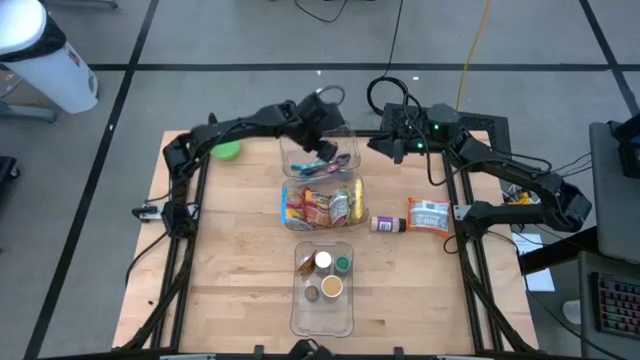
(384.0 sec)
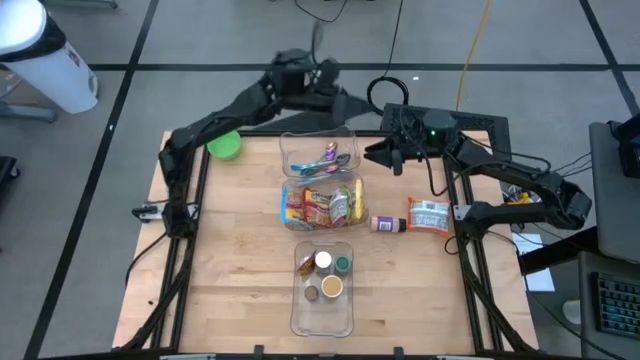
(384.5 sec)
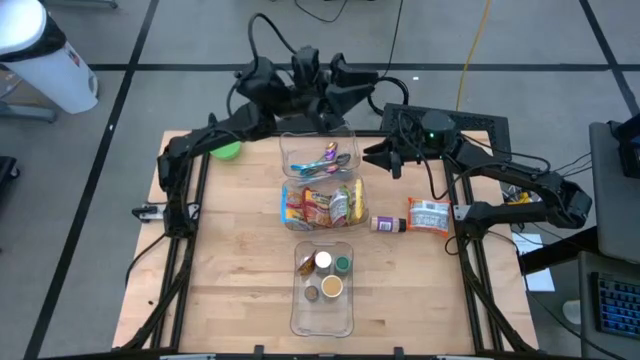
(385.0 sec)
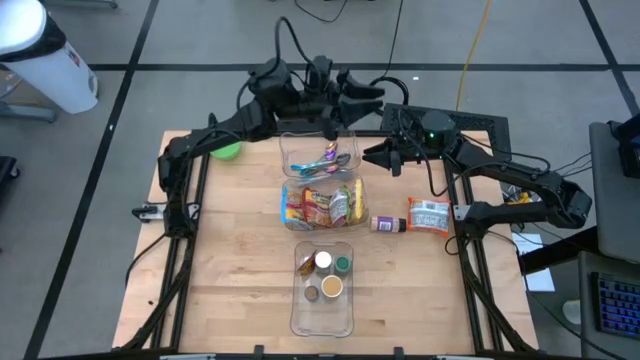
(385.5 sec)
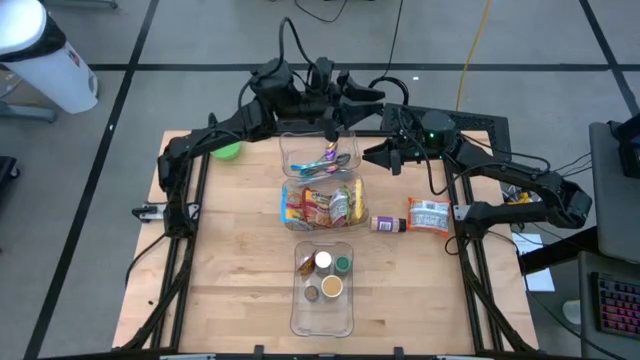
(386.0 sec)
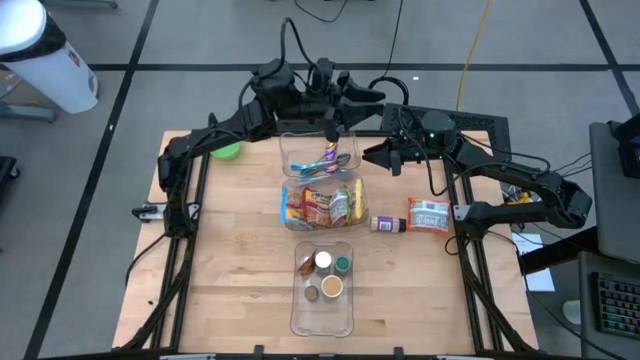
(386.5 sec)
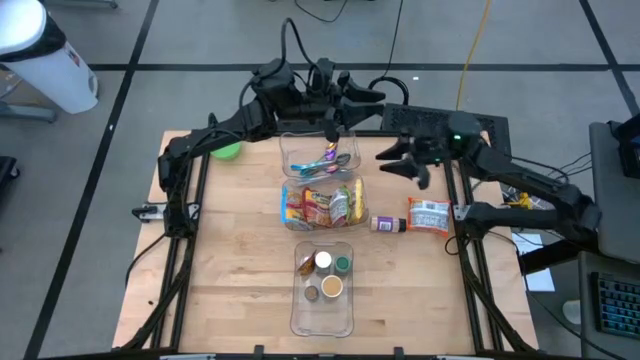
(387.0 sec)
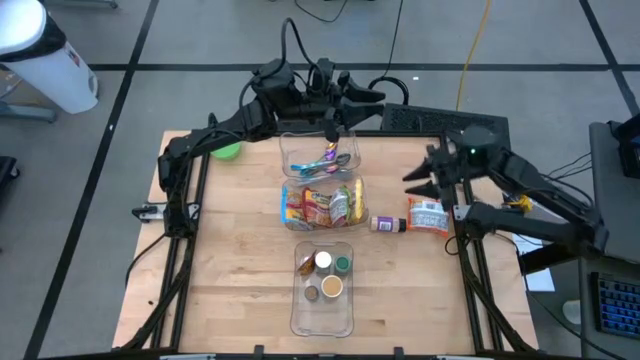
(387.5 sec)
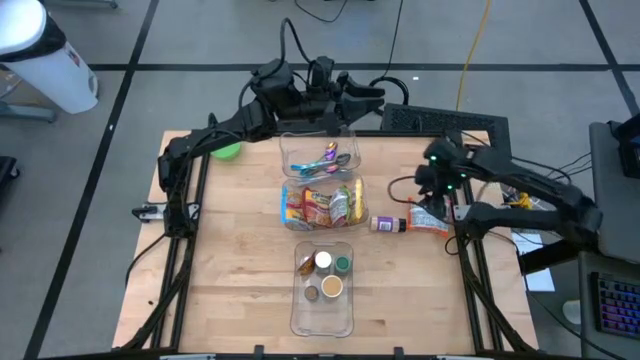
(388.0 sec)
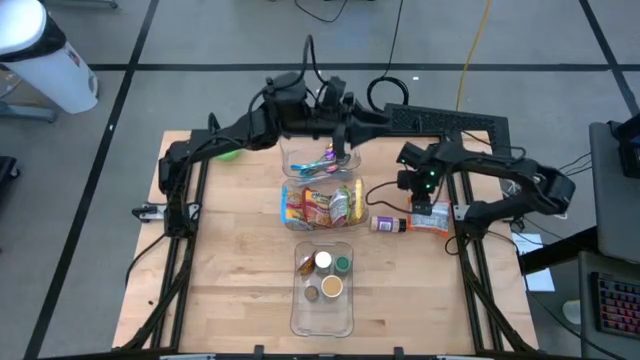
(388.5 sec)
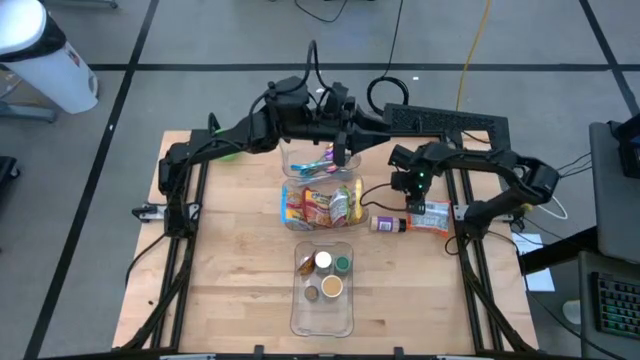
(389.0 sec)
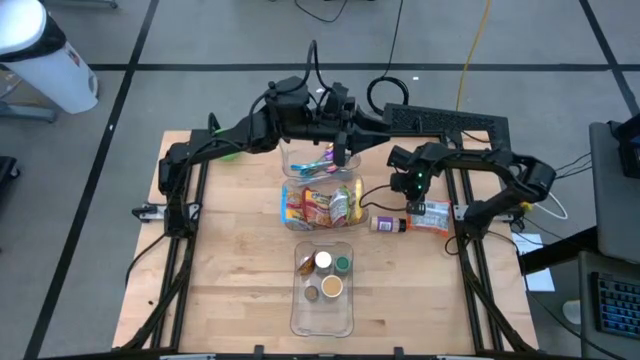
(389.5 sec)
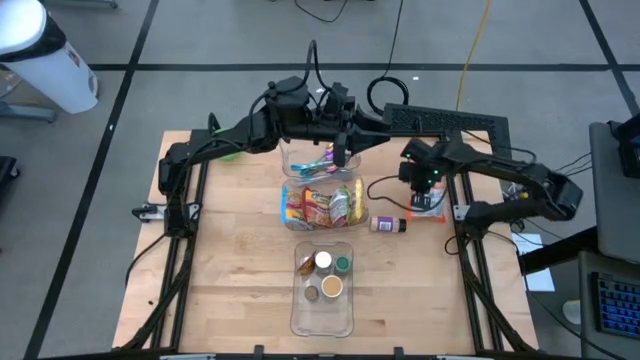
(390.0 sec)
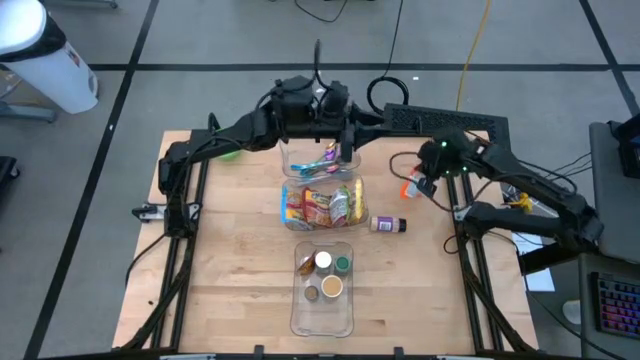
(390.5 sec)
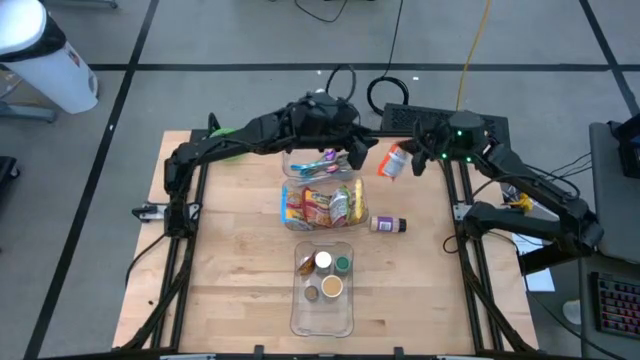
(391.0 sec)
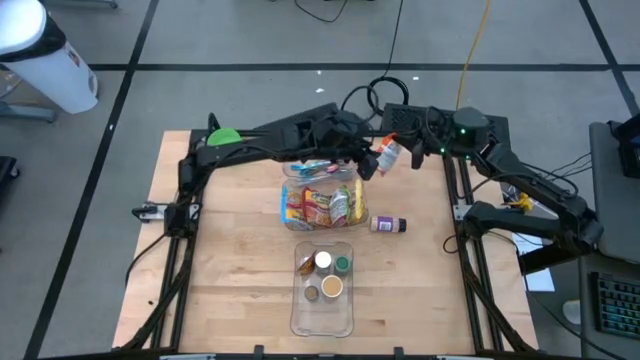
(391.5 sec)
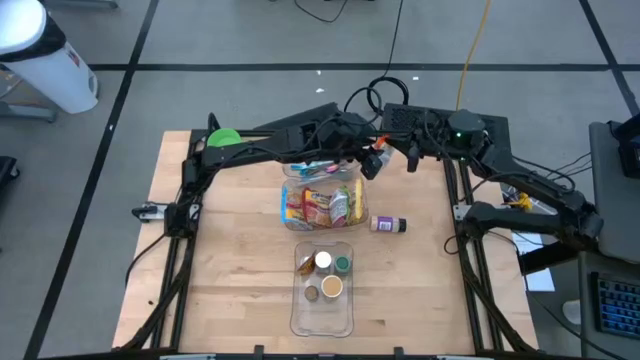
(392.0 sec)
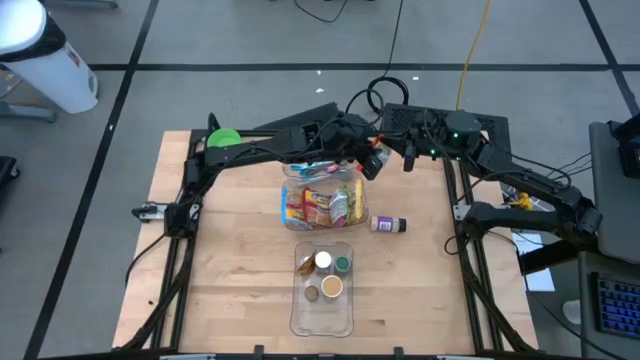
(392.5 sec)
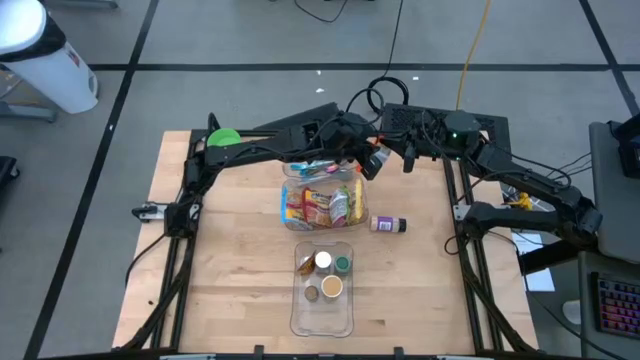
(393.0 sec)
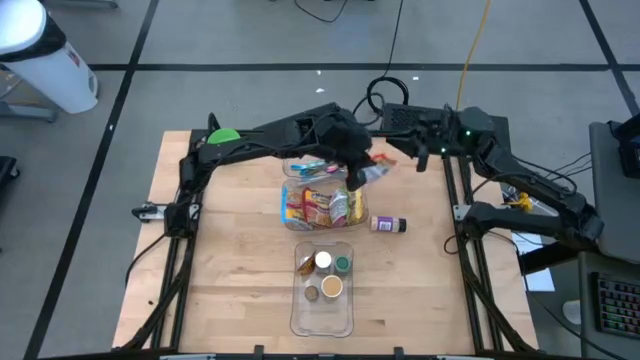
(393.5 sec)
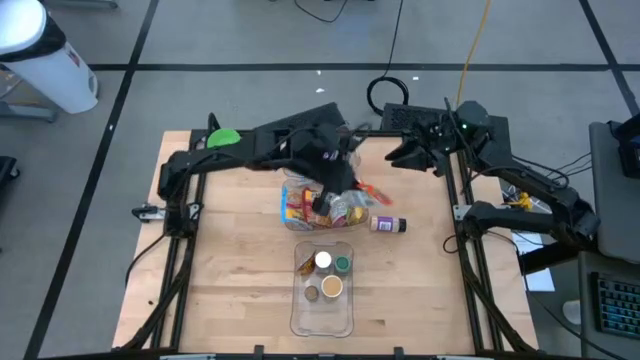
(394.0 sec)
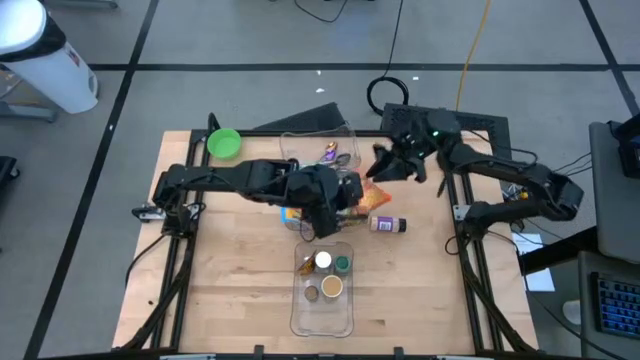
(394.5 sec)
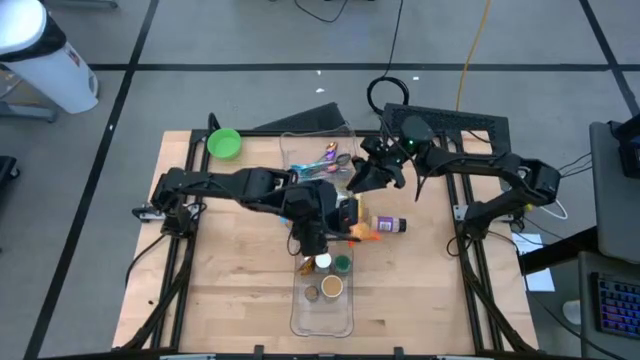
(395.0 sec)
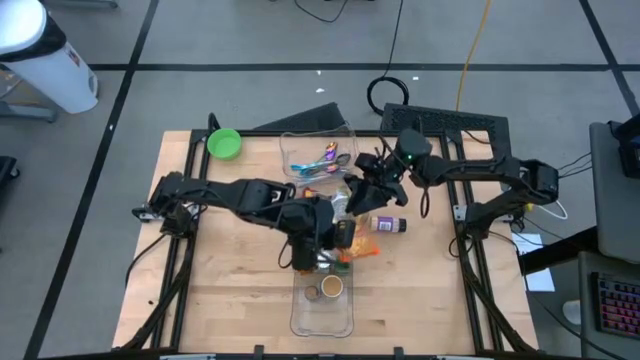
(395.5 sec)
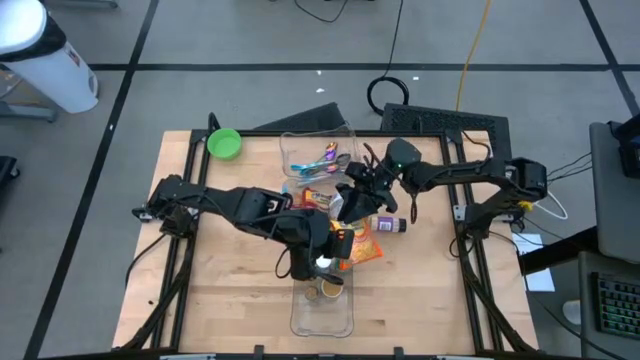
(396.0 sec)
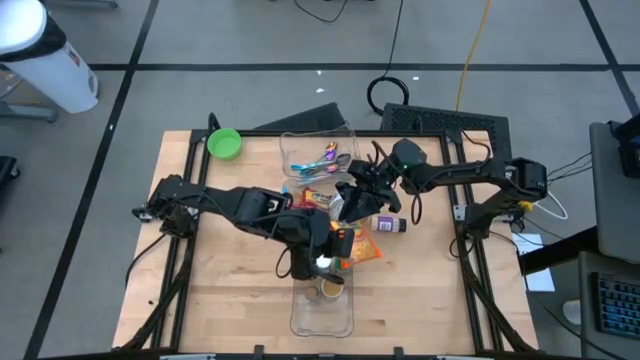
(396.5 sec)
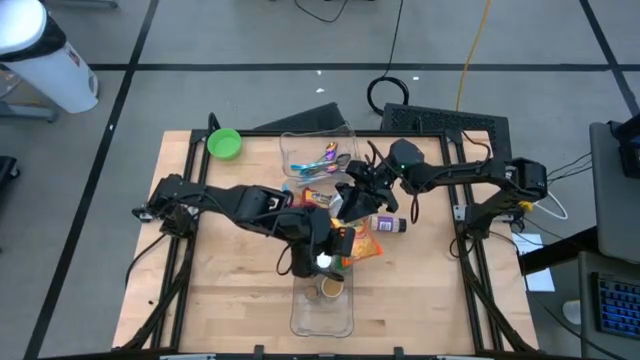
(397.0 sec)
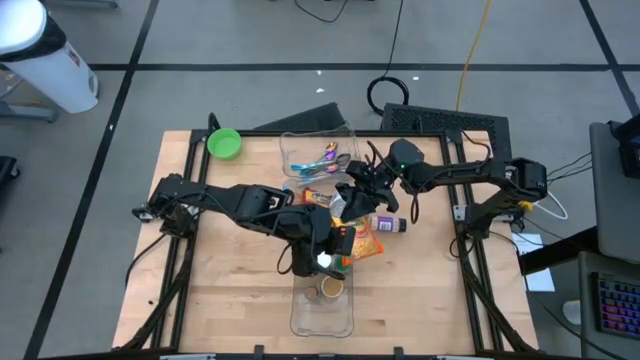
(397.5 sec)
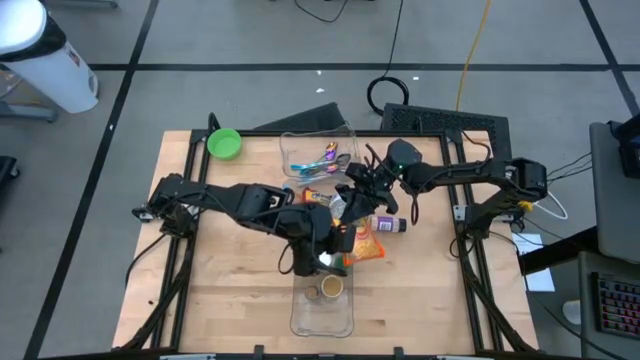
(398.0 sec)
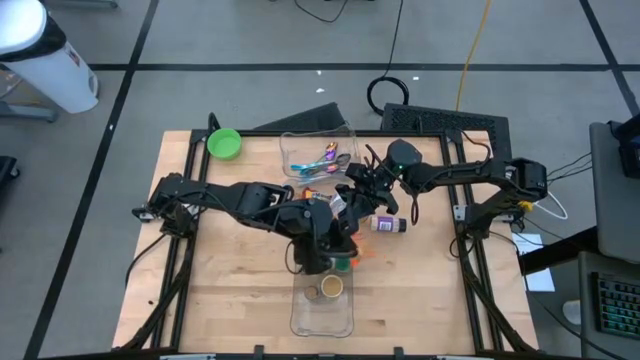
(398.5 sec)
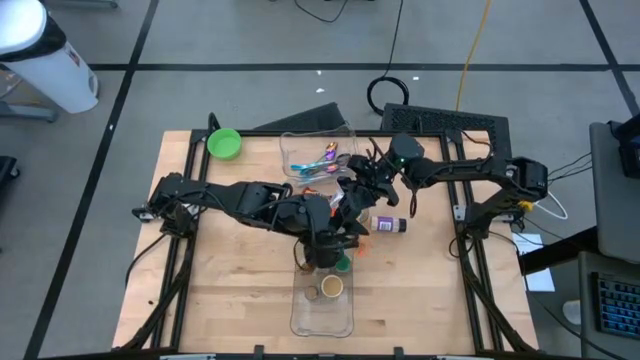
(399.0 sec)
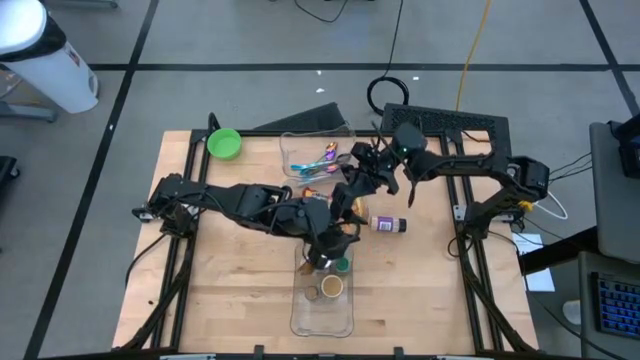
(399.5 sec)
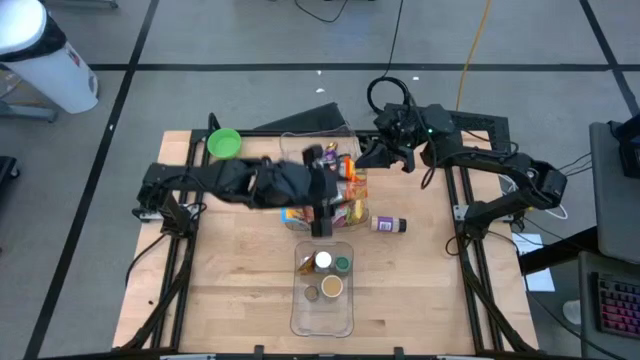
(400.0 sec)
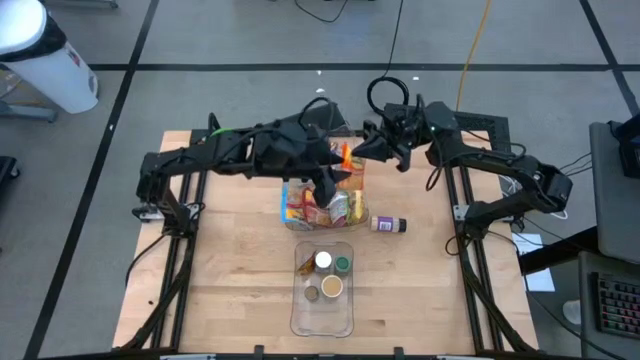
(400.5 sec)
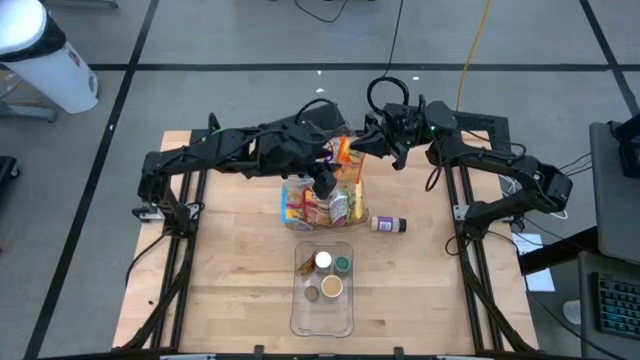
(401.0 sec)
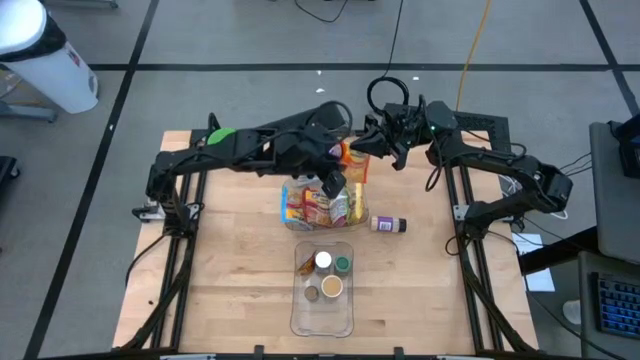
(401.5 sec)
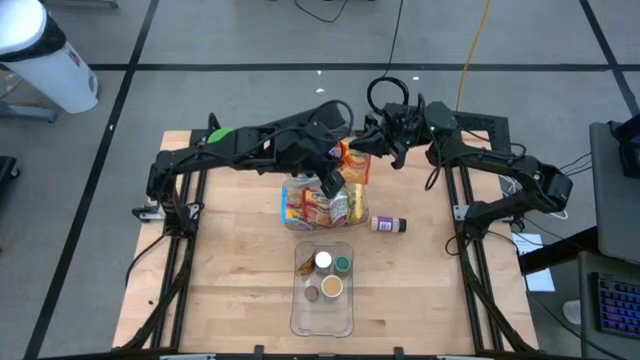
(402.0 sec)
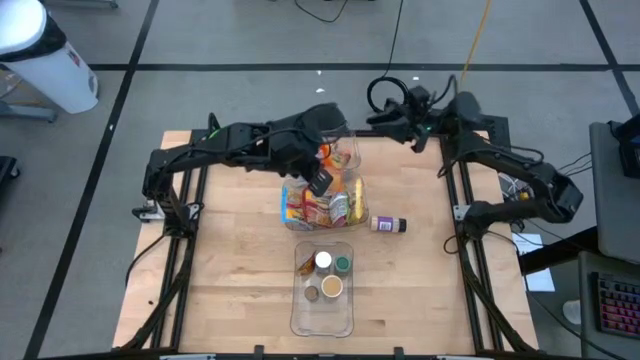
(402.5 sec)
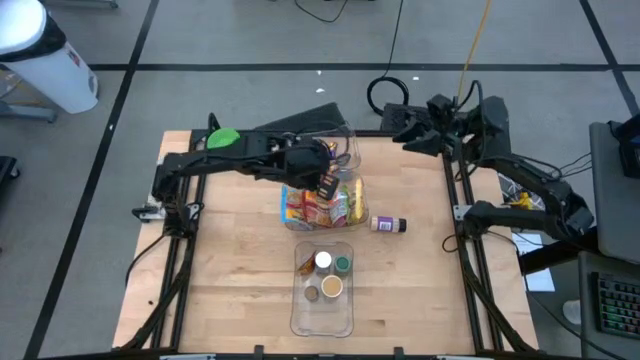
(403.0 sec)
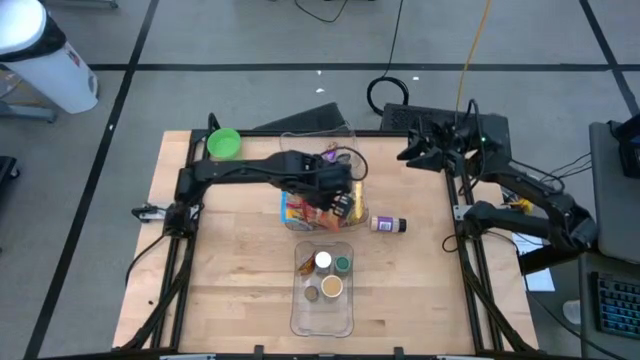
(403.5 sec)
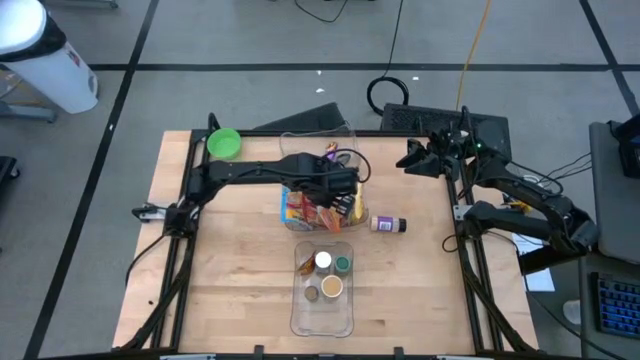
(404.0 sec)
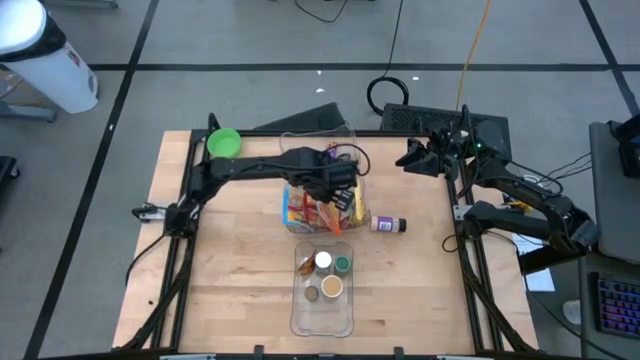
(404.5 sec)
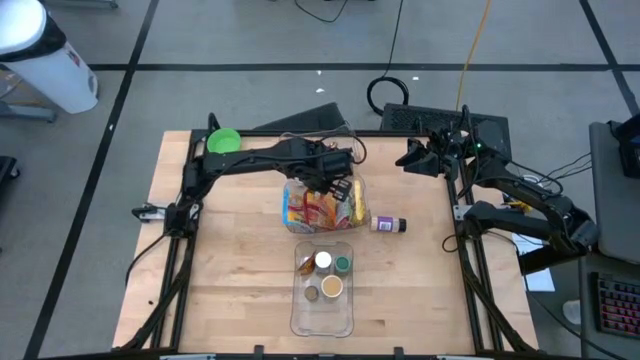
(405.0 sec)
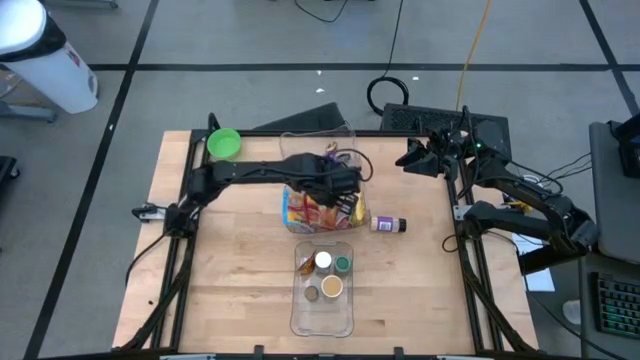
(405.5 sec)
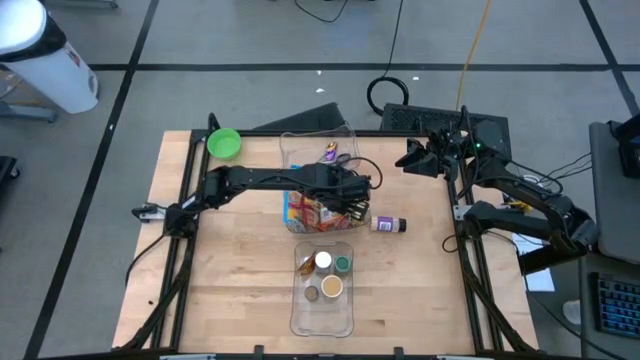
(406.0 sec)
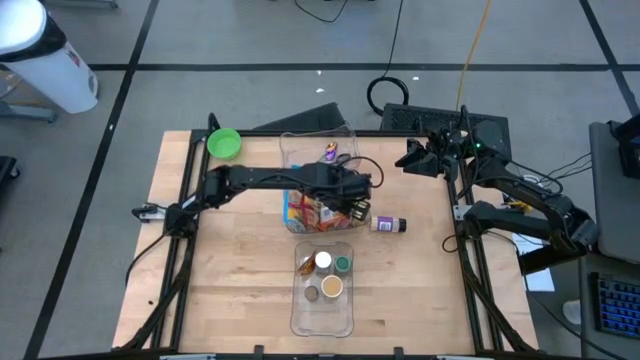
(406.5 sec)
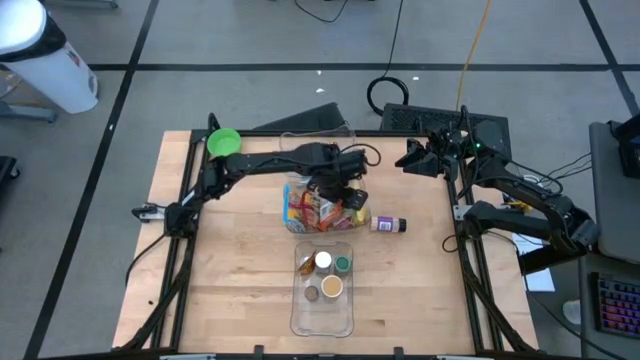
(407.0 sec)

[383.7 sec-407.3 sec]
Task: Pick & Place Food Item
Put the orange noodle pack into the middle transparent bin
